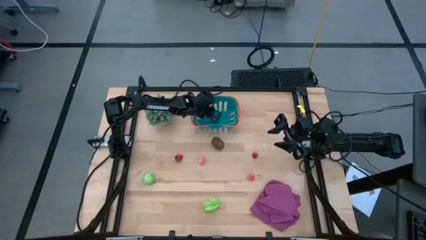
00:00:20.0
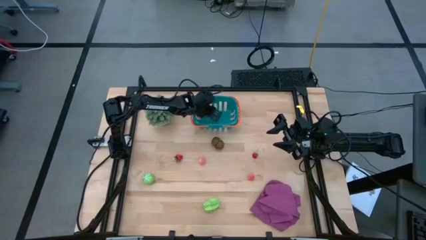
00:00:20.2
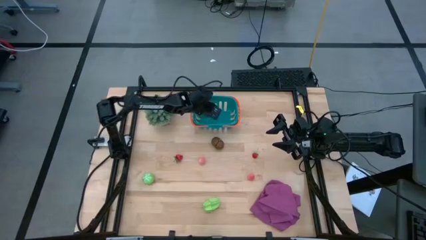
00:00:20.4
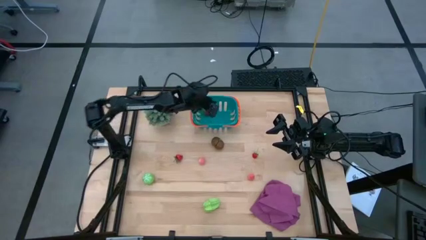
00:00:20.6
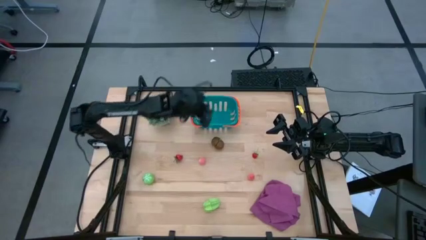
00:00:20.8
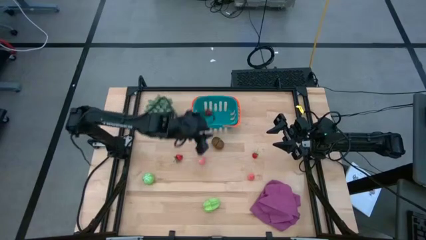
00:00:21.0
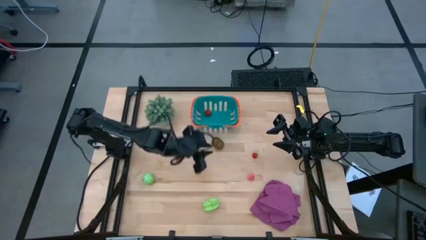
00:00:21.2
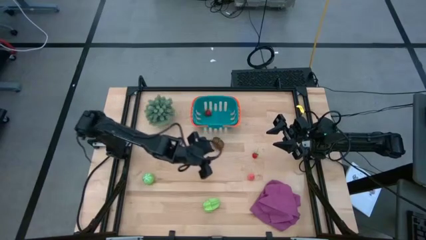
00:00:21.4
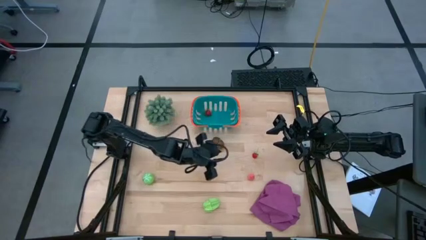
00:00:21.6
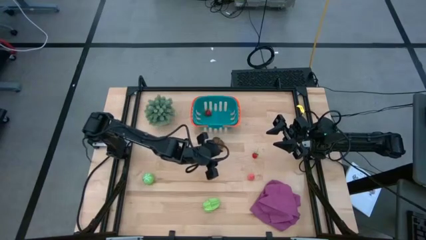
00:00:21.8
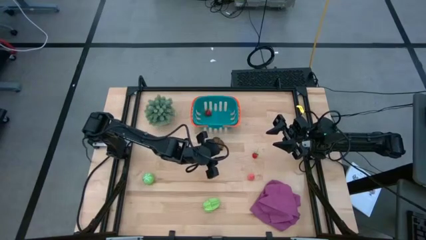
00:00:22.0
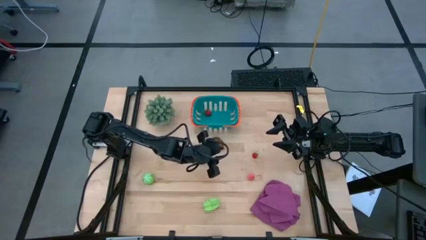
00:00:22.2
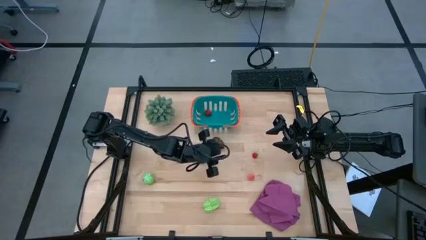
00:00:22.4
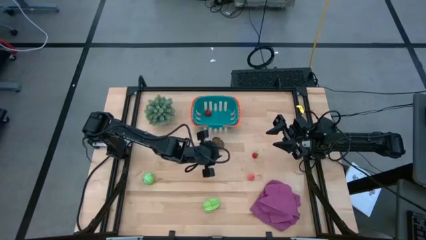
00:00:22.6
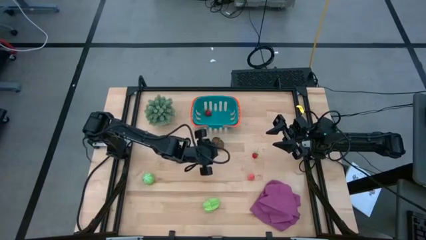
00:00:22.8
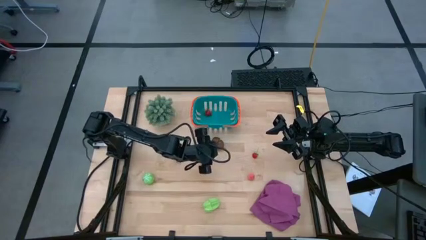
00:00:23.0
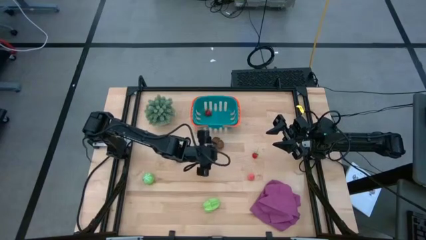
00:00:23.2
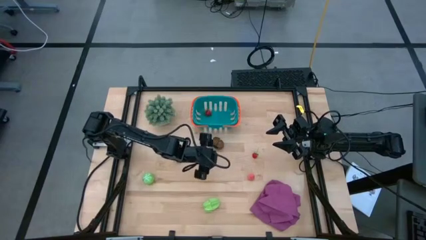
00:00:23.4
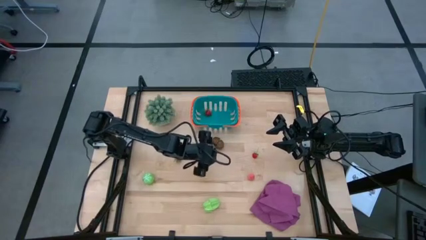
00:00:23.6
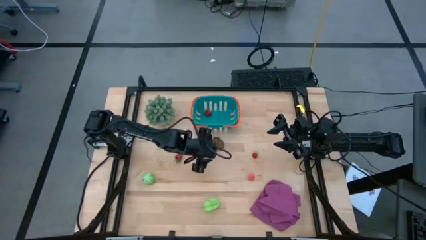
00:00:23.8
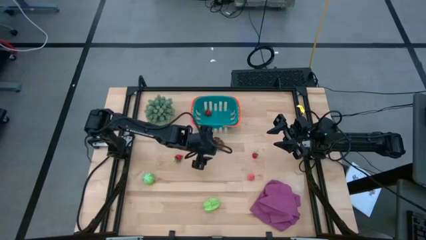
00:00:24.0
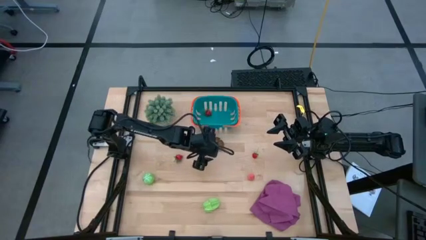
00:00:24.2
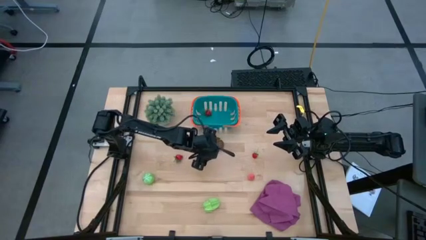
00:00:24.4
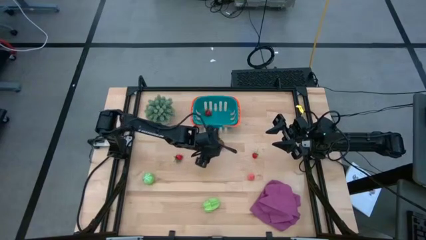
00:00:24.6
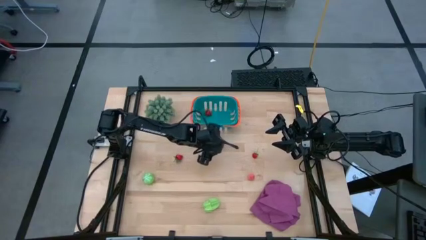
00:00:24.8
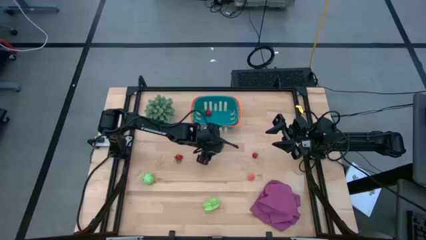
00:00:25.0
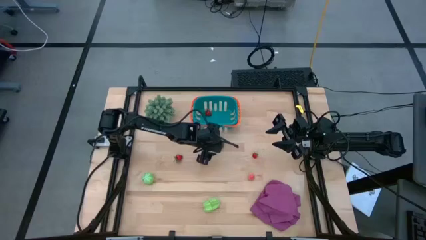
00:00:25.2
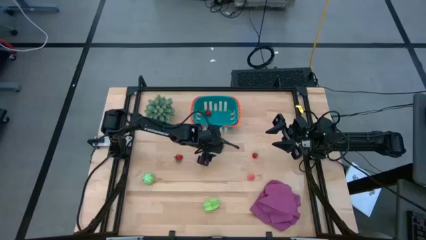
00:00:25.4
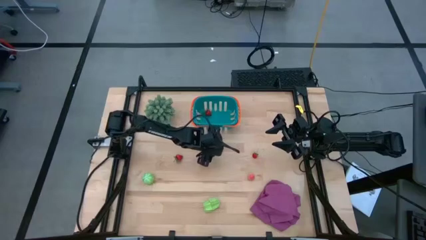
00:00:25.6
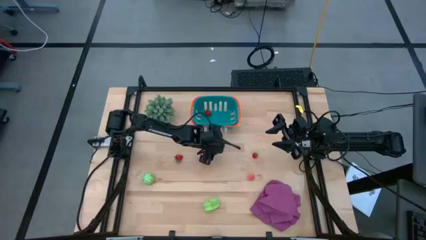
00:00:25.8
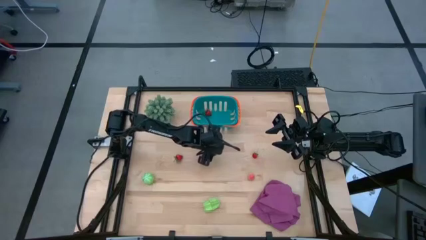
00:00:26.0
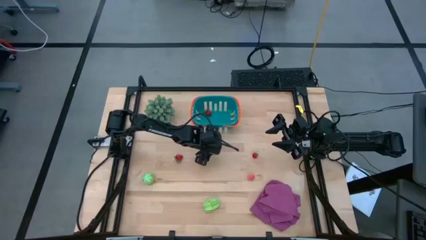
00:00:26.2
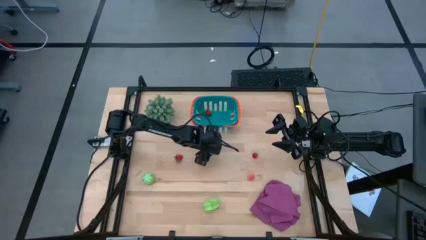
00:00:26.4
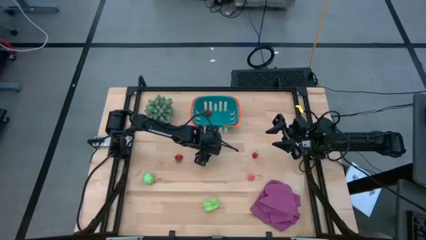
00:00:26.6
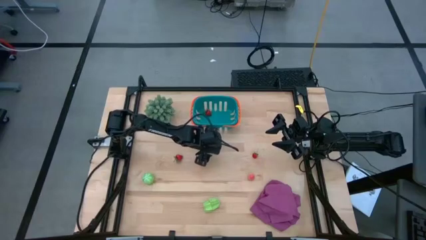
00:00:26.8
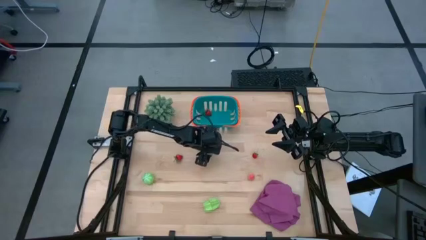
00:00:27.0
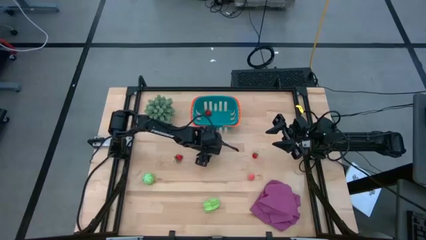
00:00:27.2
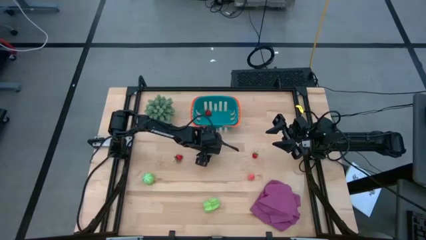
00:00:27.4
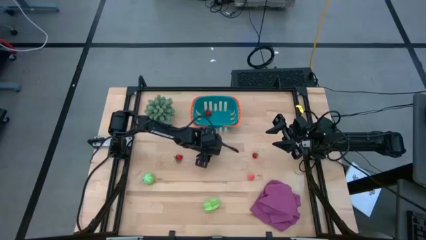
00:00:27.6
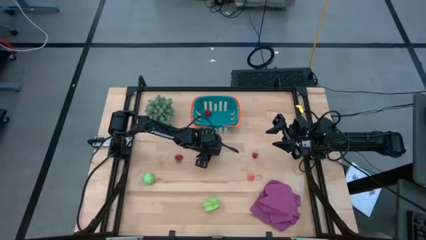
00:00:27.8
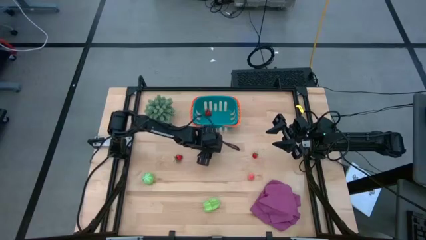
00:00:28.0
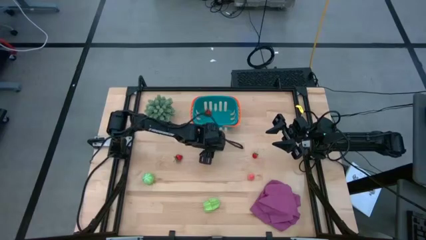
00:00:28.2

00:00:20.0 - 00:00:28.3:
Task: Pick and placing Produce into tupperware
Put the brown kiwi into the blue basket

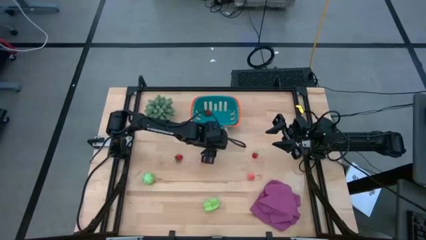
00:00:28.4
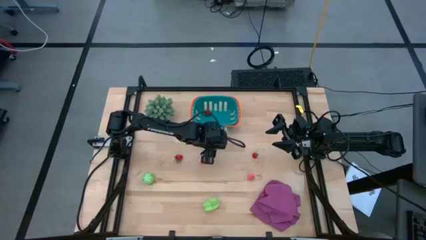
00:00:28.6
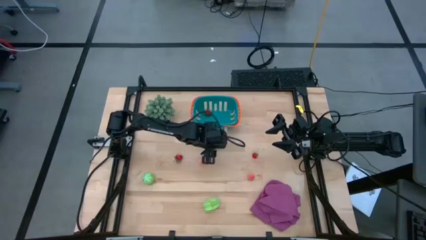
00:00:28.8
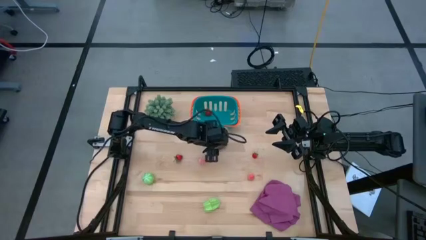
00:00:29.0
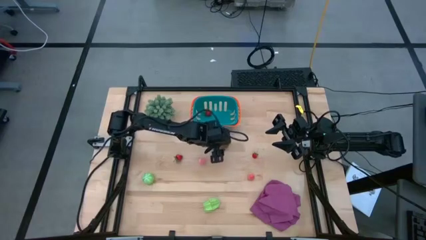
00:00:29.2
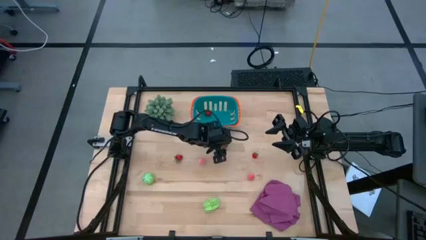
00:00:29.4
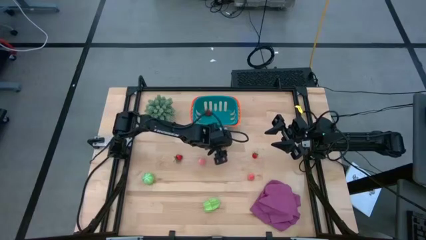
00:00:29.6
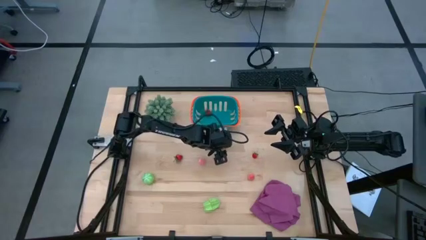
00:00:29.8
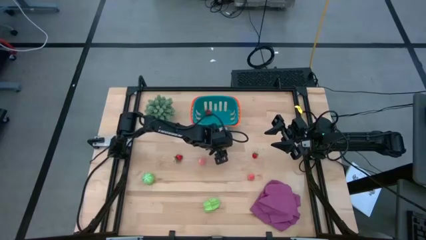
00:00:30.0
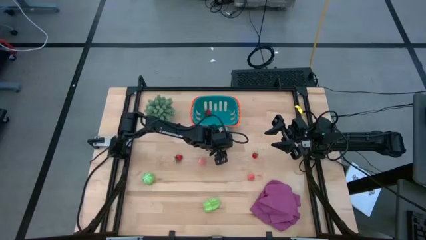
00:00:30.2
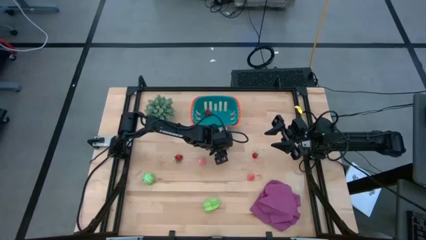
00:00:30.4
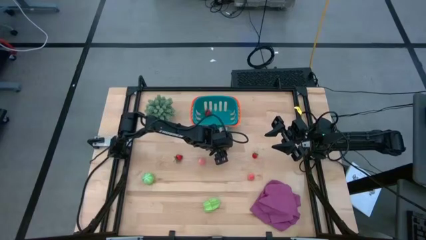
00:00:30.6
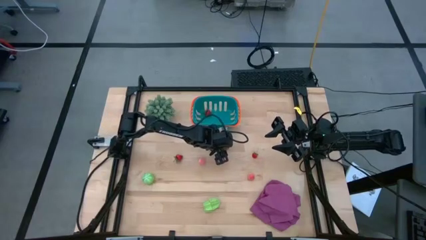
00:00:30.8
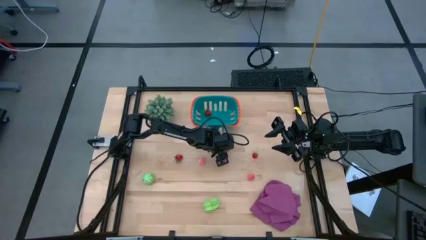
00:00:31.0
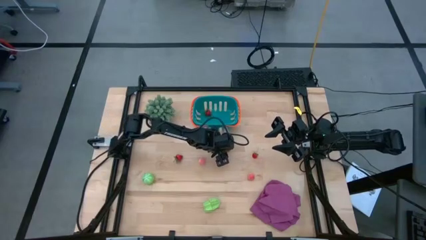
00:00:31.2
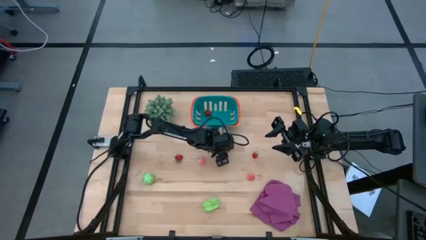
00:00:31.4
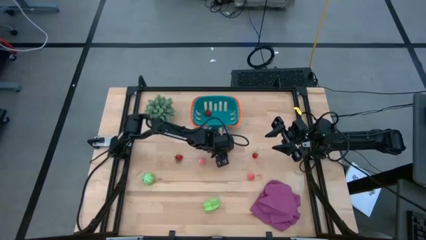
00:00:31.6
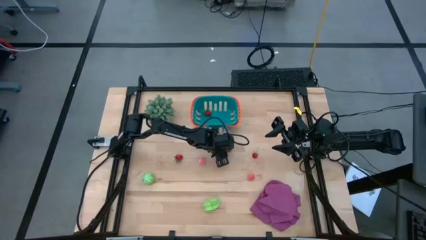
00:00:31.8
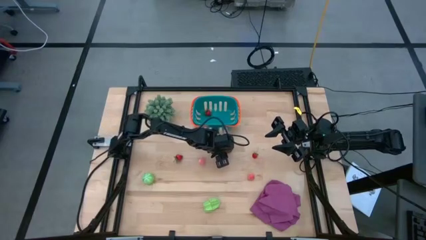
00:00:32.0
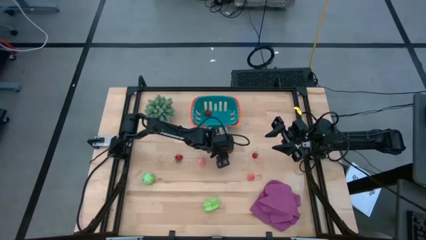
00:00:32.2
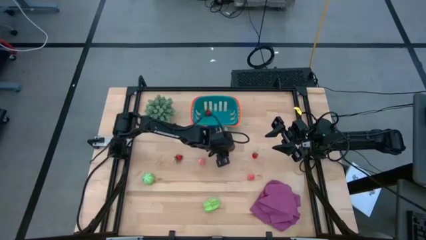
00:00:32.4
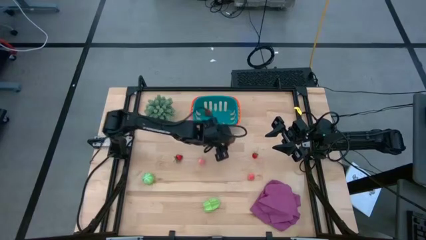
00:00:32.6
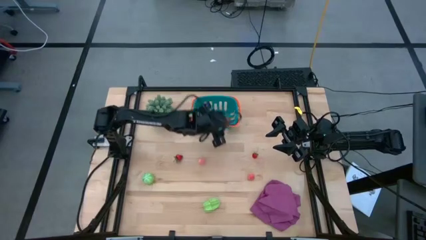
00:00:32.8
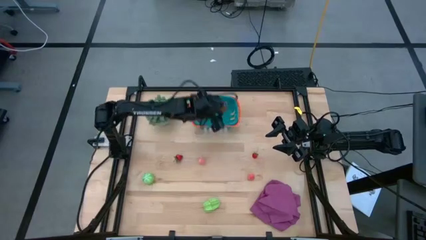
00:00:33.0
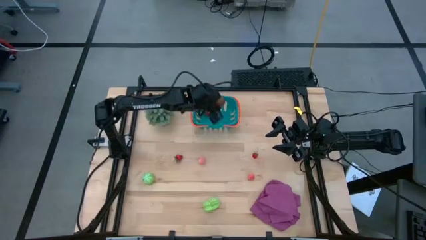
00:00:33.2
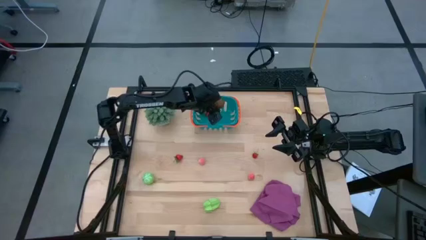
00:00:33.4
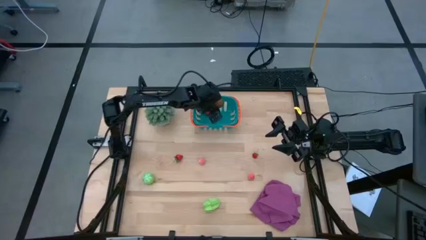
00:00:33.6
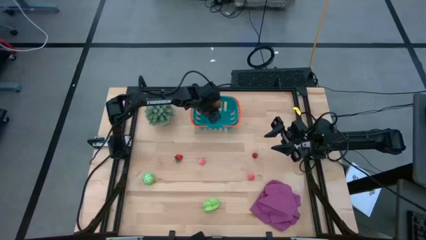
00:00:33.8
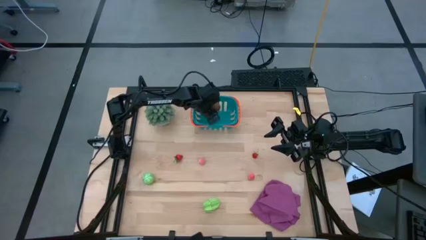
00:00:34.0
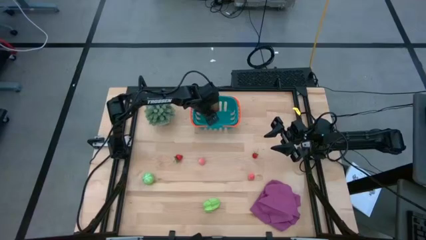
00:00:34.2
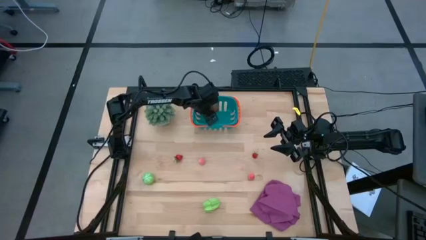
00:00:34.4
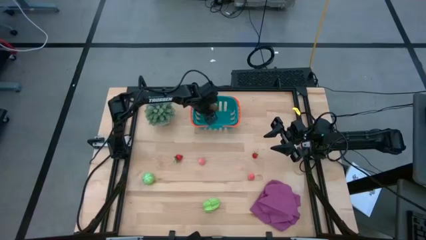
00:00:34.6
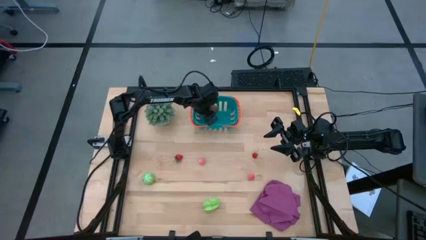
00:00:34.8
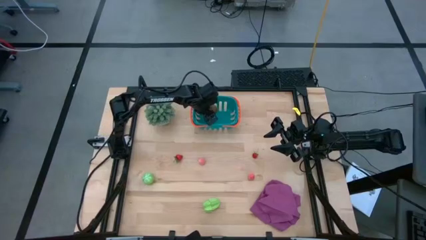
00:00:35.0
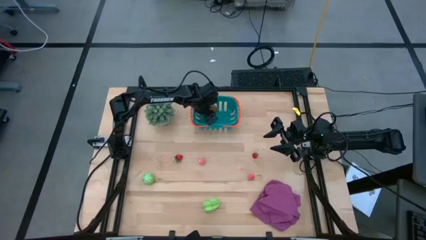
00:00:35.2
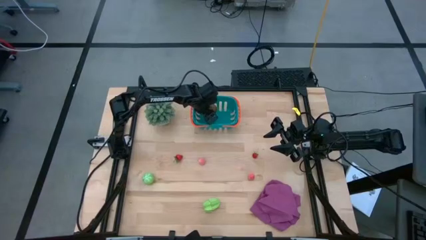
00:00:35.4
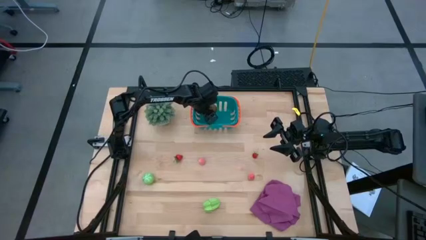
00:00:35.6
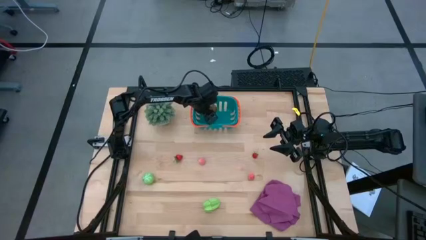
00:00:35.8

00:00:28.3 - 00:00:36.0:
Put the brown kiwi into the blue basket
